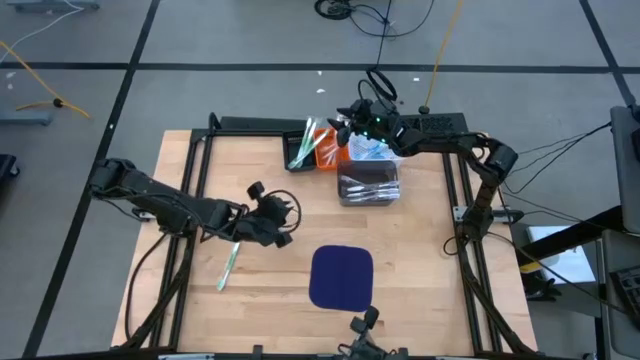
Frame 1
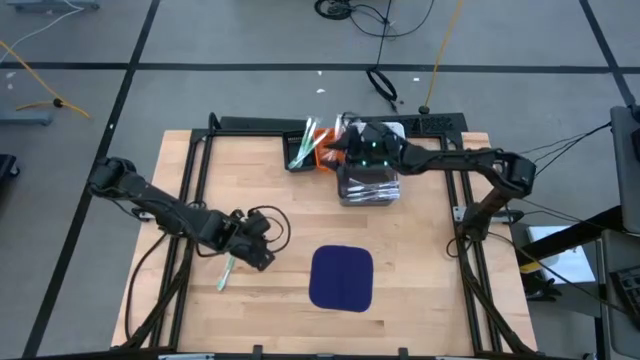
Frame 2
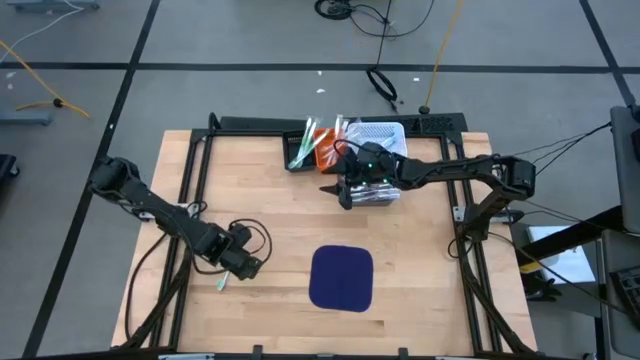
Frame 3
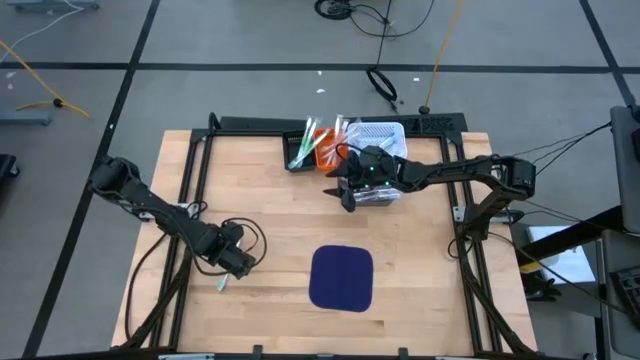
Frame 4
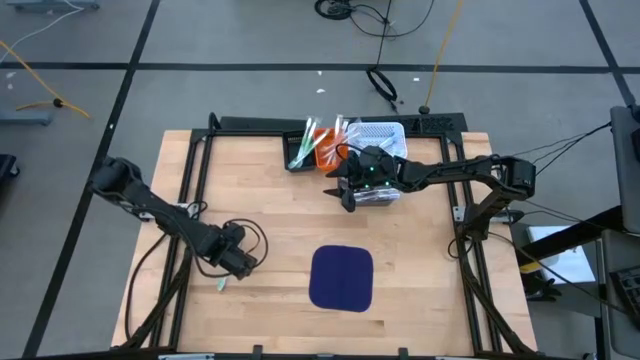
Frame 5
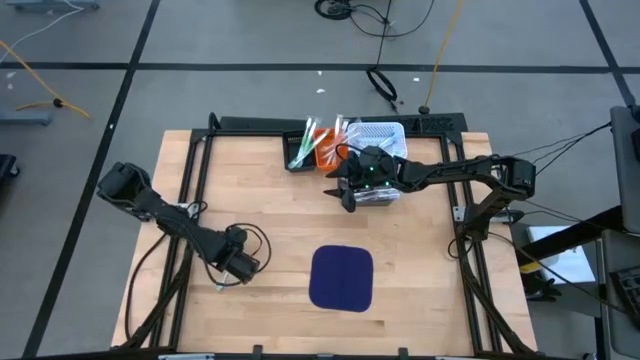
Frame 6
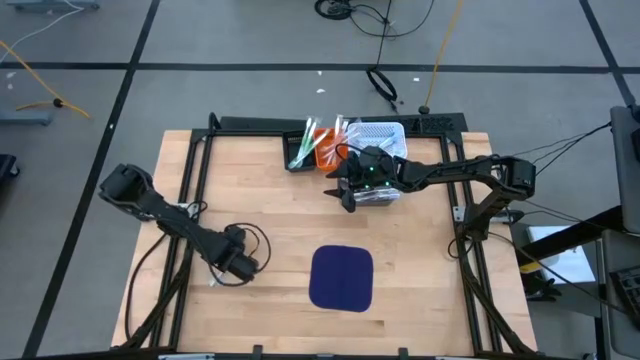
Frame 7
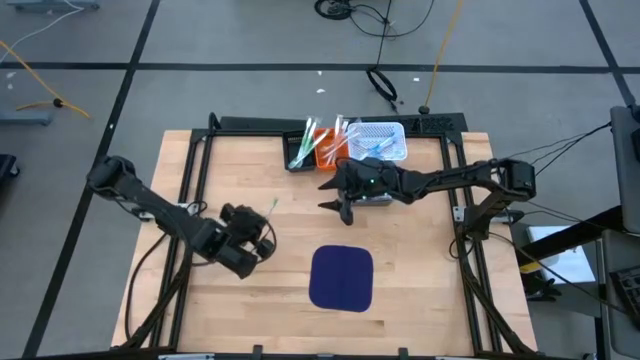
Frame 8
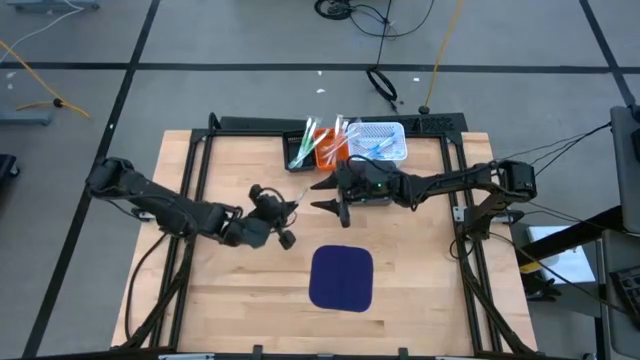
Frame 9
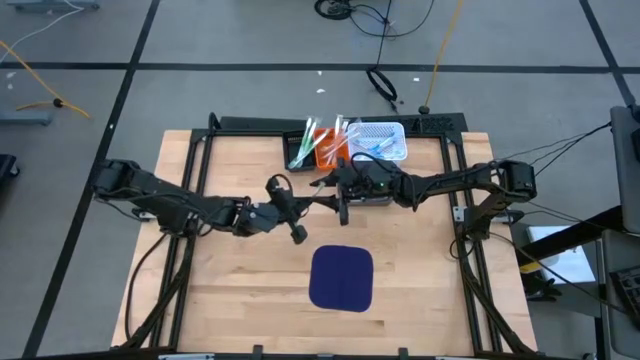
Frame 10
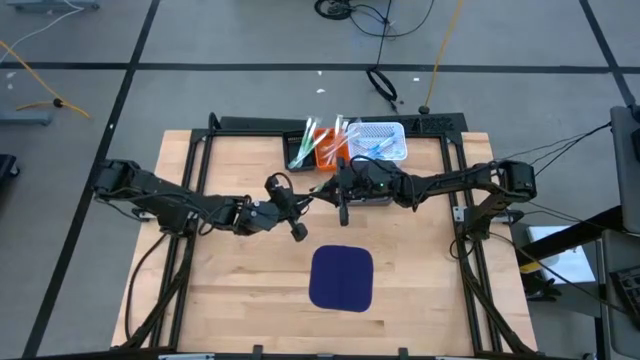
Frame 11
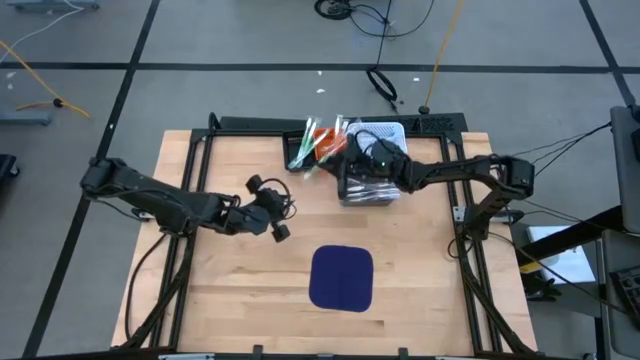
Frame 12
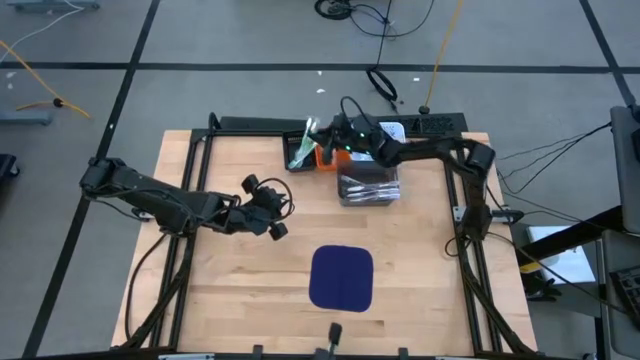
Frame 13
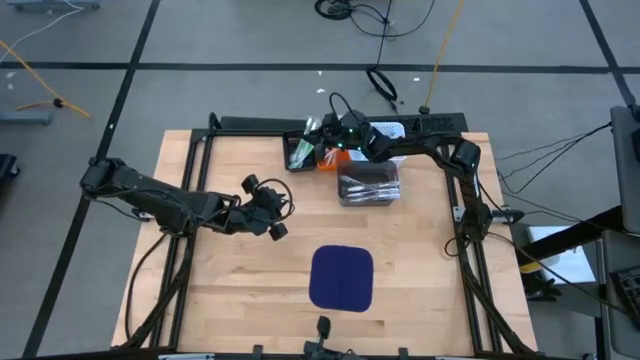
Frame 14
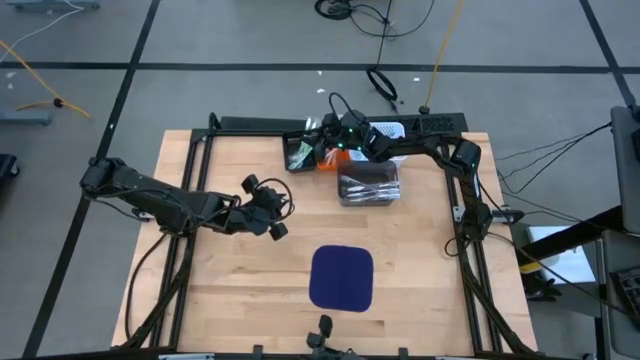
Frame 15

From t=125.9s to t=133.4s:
Task: Pick & Place Toothbrushes
Put the green toothbrush into the black basket

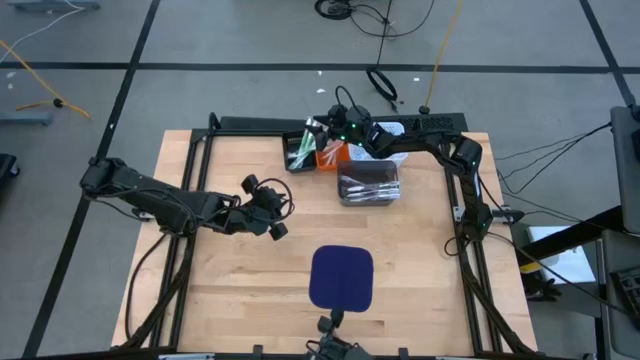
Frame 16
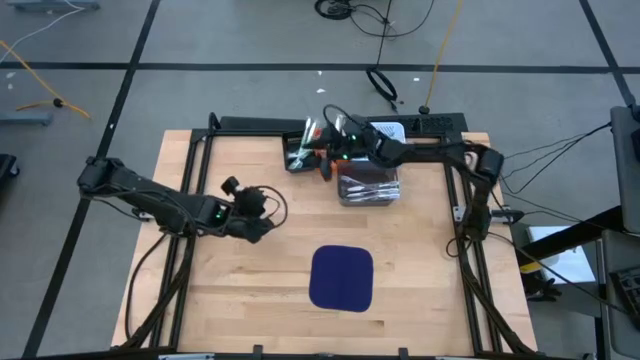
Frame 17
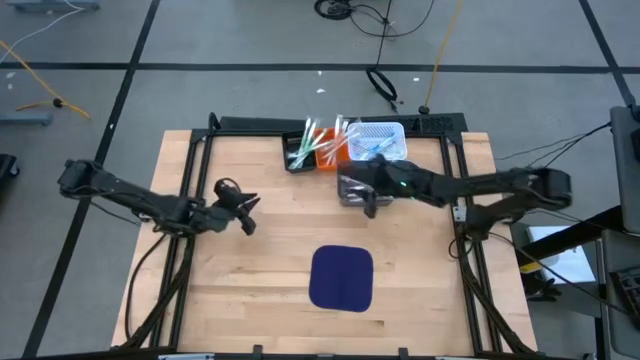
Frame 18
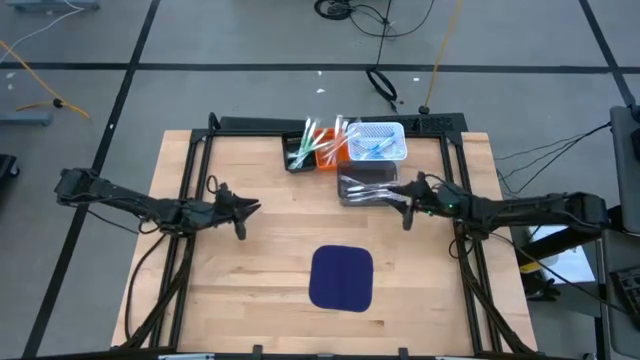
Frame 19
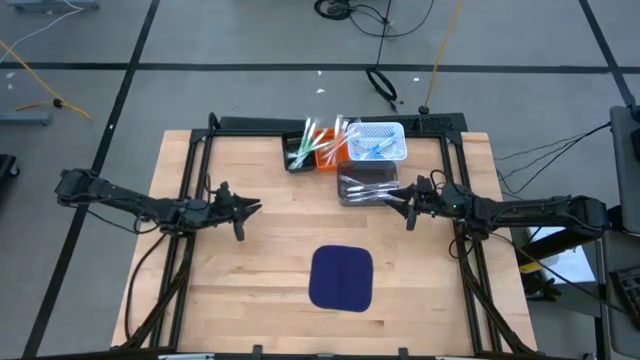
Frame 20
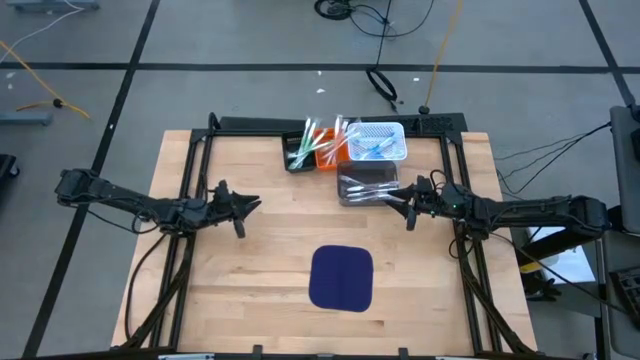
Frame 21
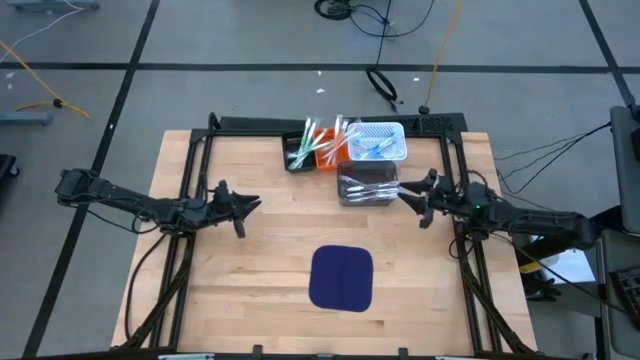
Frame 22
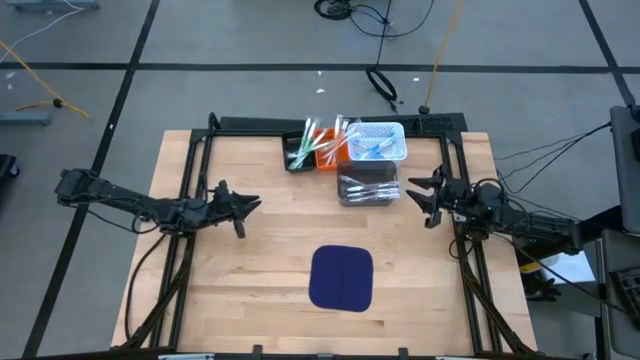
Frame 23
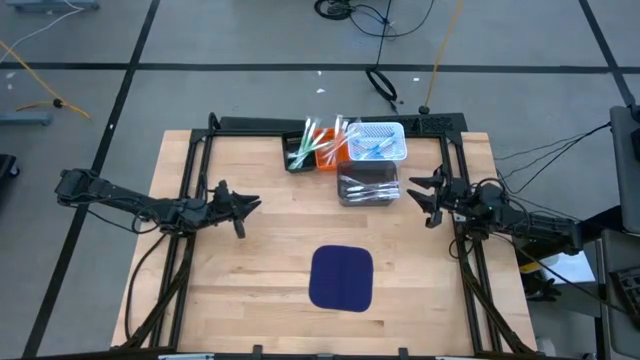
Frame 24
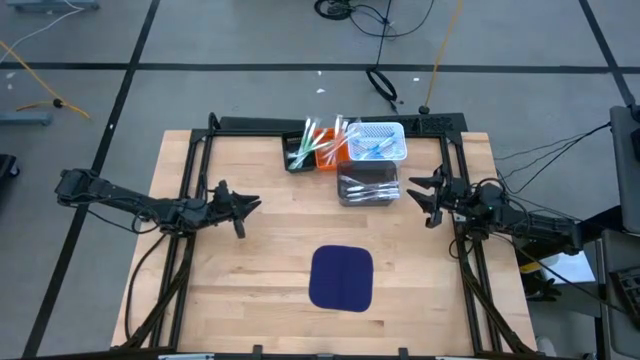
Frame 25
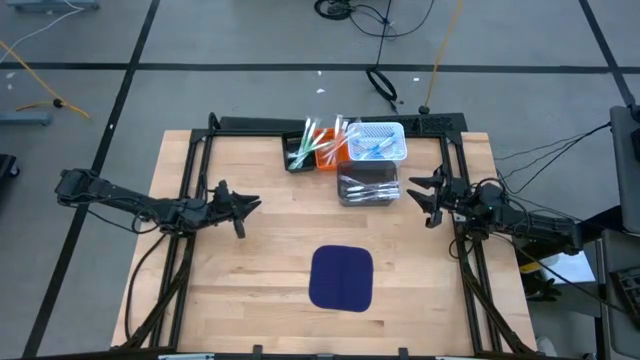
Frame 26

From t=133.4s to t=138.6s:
Return to Home Position

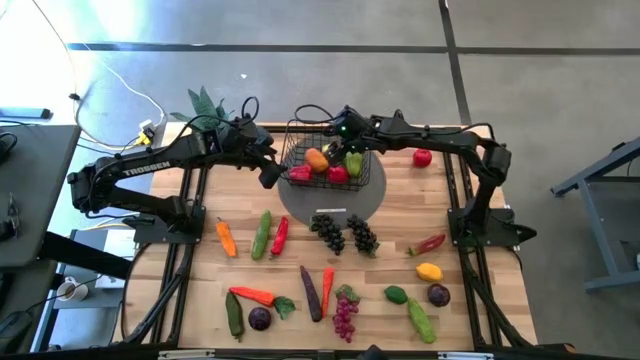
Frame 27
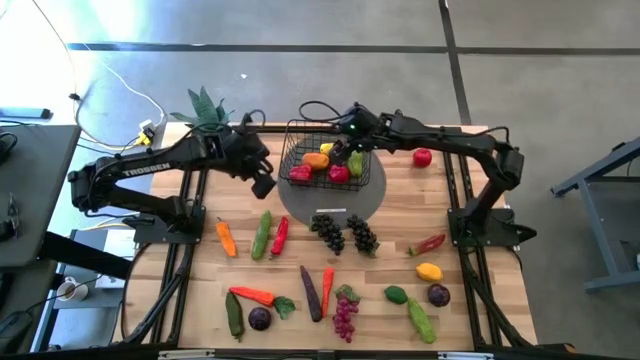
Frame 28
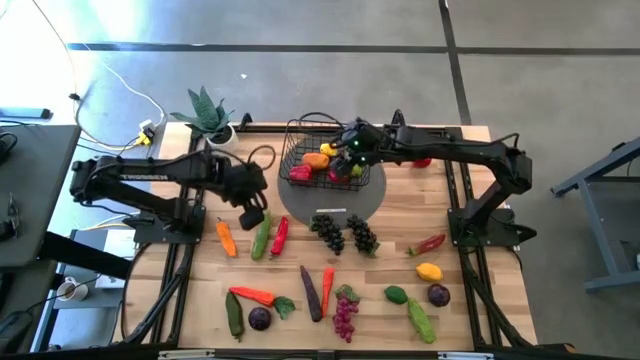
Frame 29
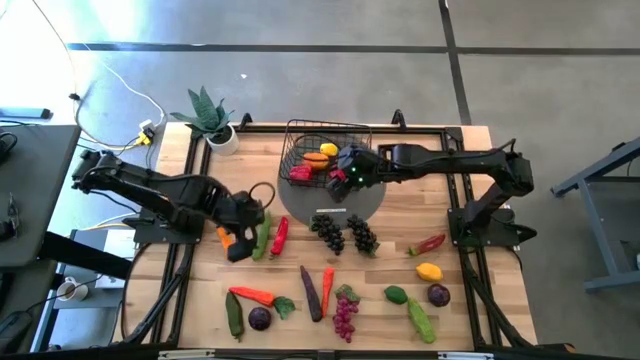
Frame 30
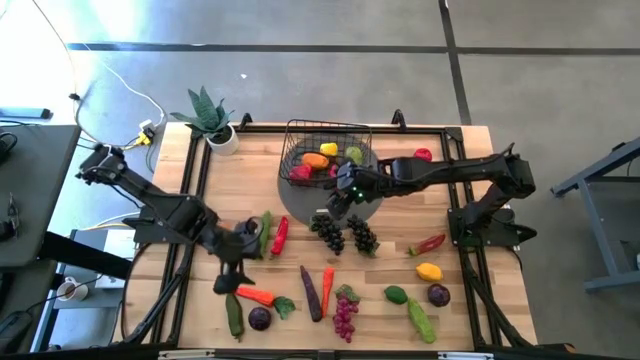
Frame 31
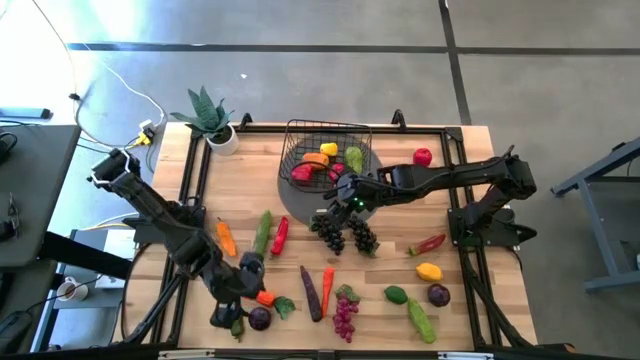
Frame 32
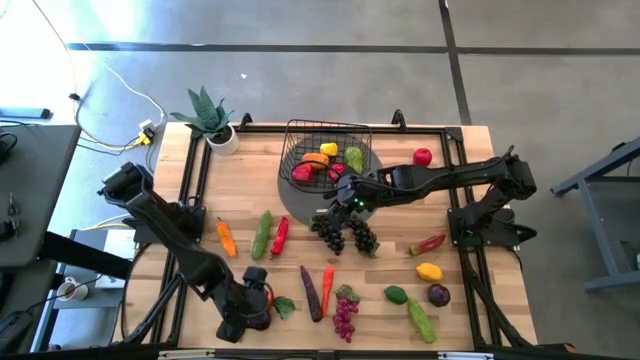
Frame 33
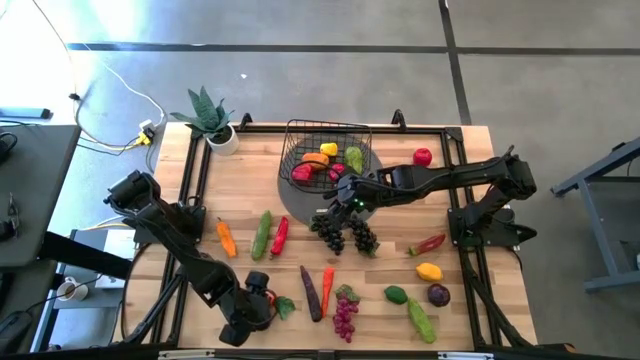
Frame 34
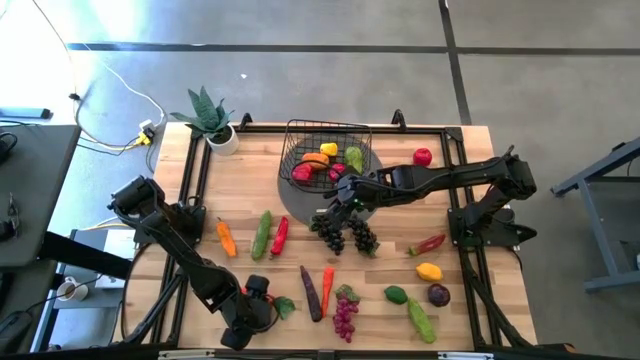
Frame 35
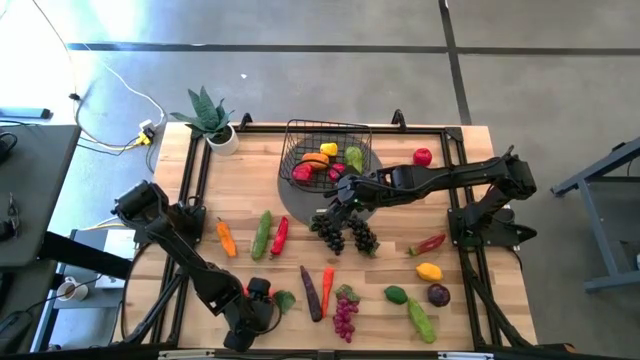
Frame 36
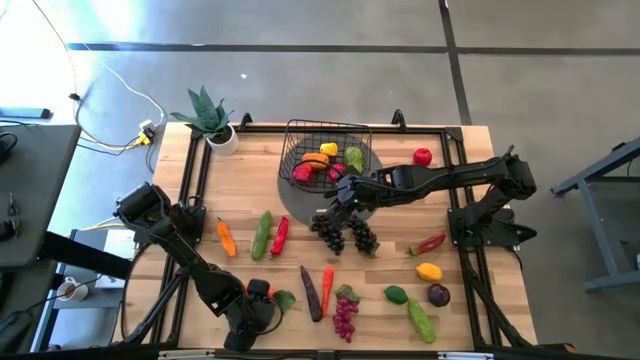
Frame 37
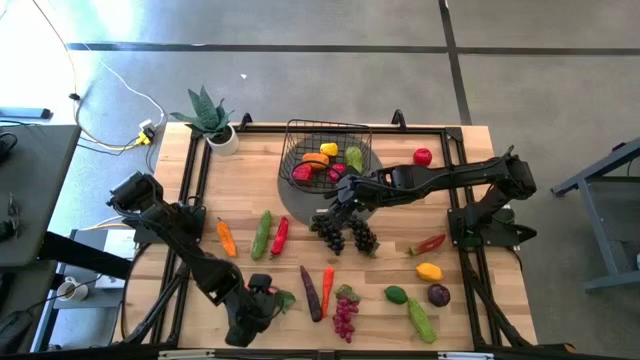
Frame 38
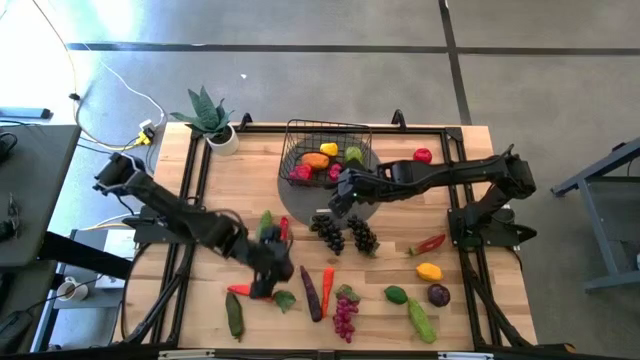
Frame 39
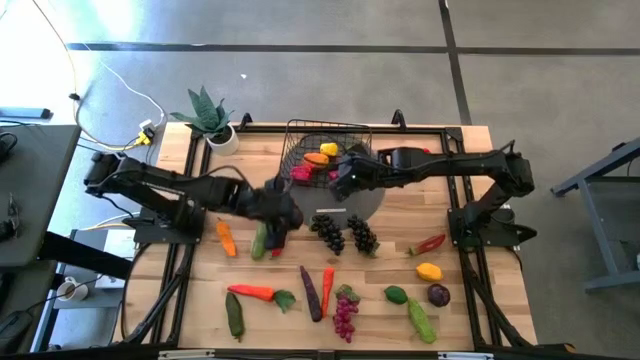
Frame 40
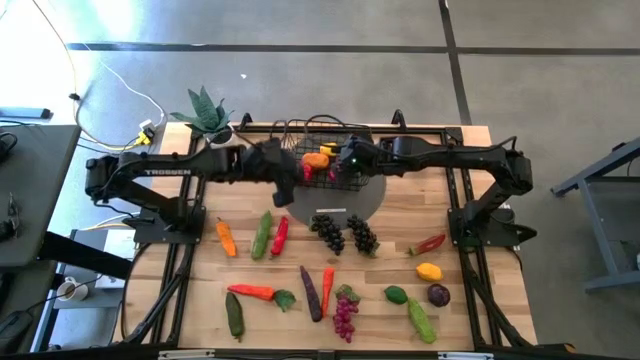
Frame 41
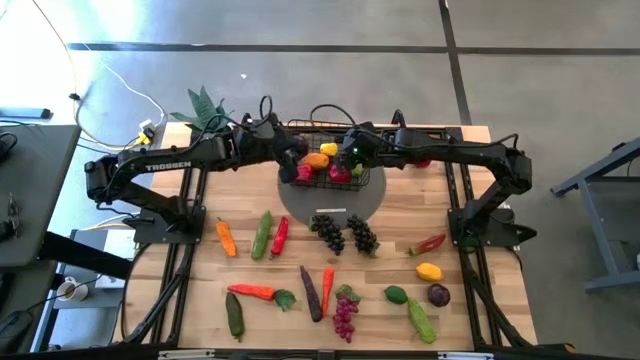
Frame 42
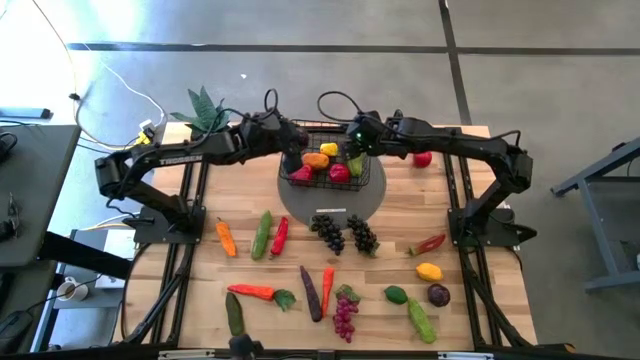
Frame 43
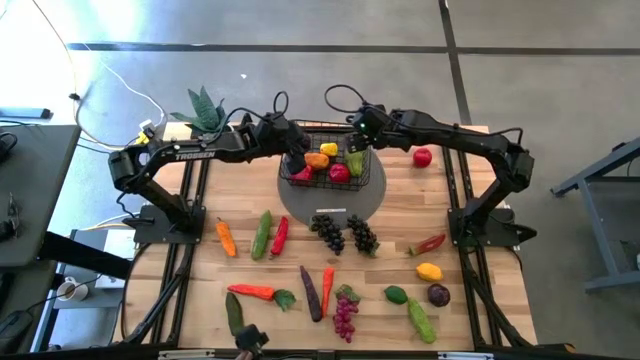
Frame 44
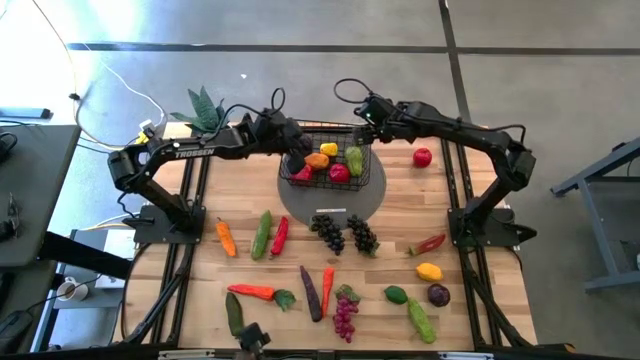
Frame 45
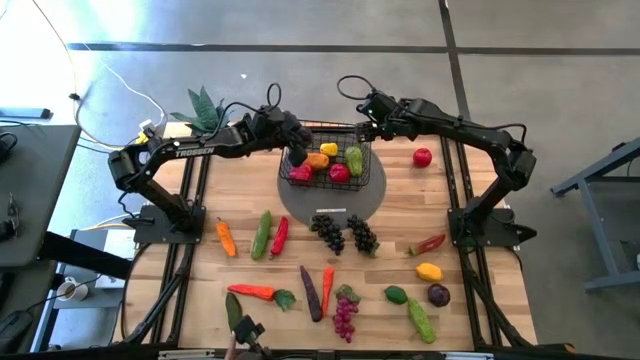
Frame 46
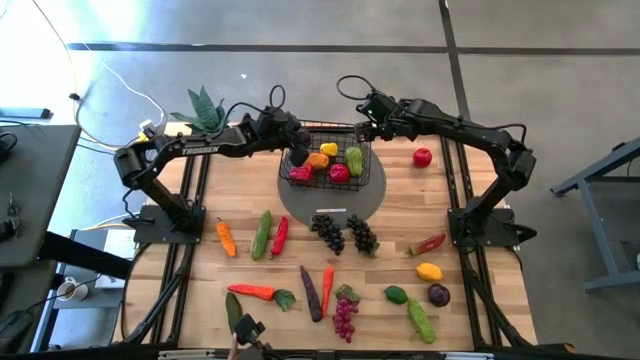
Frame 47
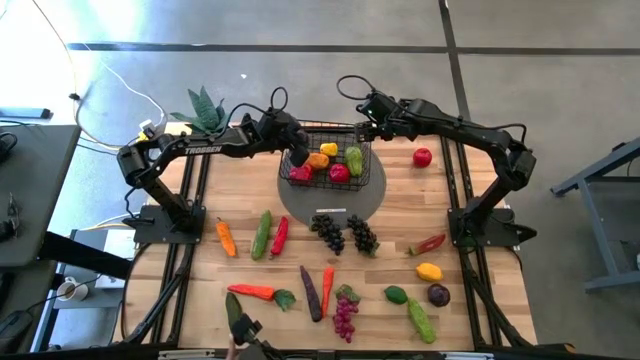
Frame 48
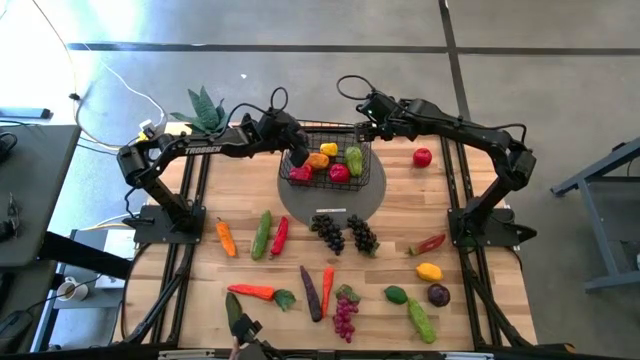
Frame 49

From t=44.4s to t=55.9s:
Task: Build produce basket
Put the purple plum into the wire basket
